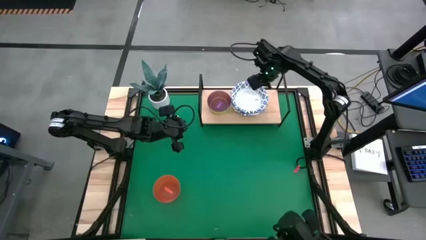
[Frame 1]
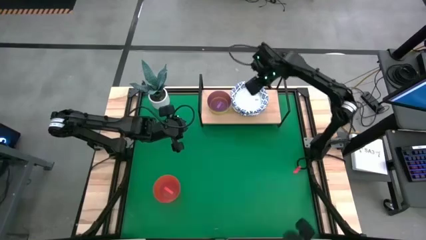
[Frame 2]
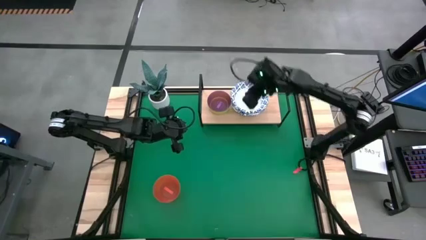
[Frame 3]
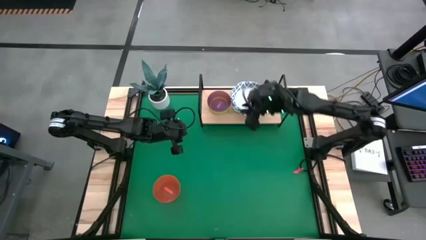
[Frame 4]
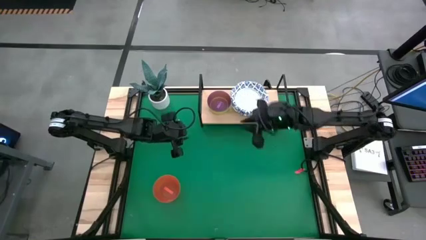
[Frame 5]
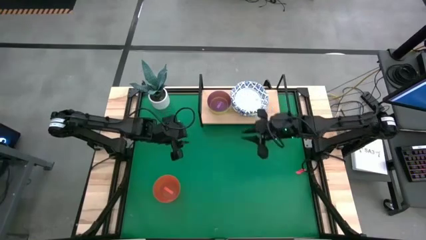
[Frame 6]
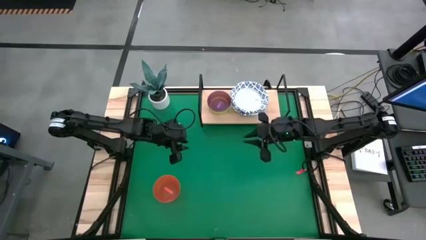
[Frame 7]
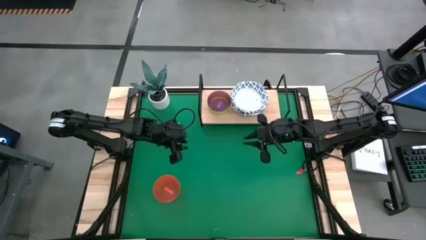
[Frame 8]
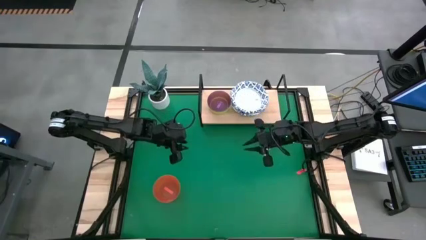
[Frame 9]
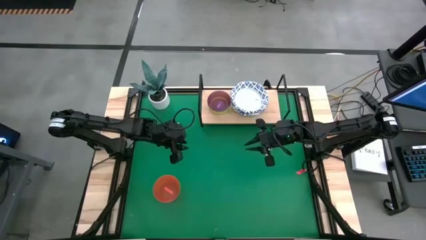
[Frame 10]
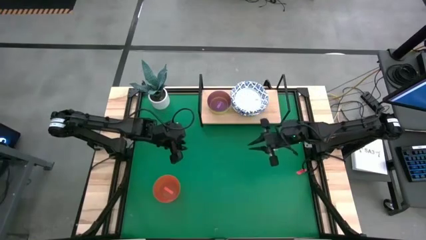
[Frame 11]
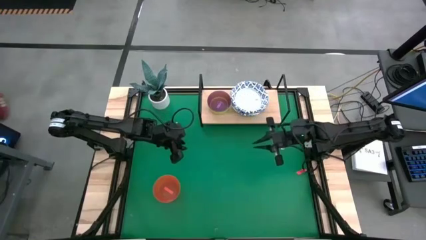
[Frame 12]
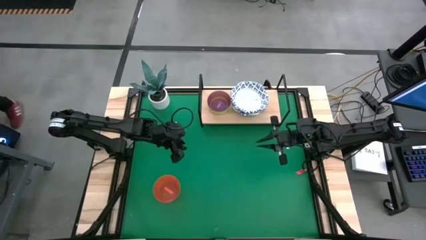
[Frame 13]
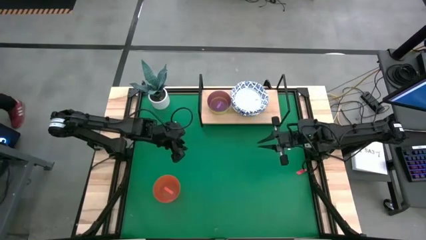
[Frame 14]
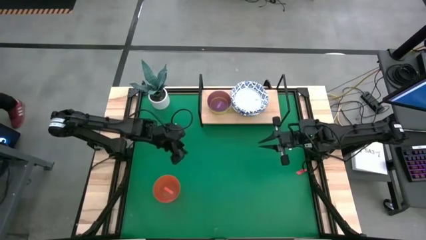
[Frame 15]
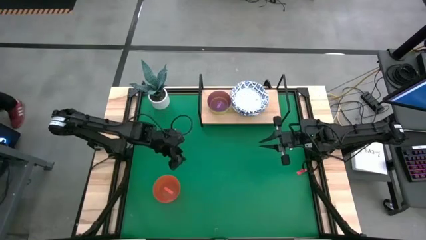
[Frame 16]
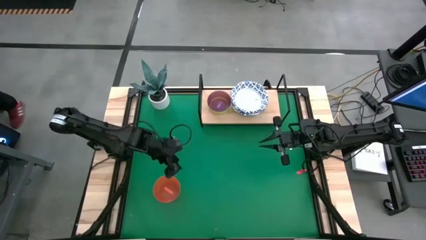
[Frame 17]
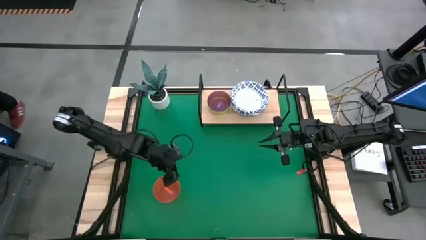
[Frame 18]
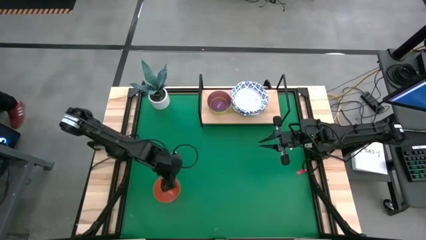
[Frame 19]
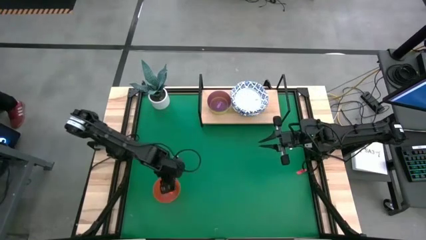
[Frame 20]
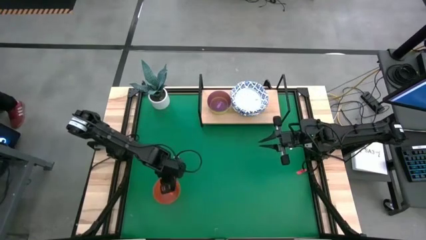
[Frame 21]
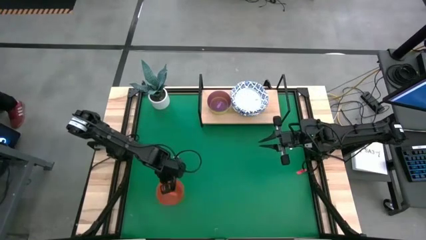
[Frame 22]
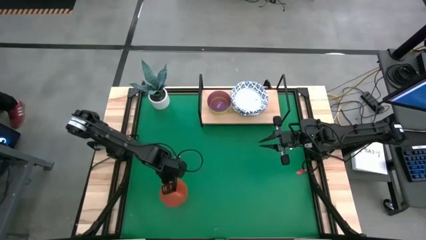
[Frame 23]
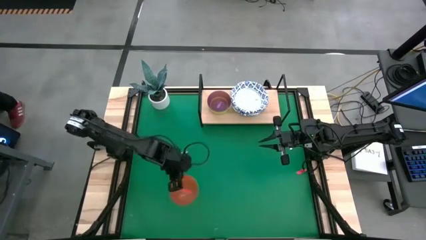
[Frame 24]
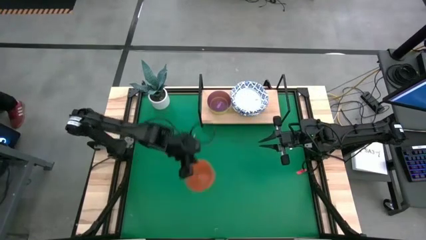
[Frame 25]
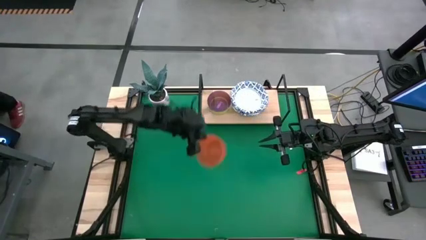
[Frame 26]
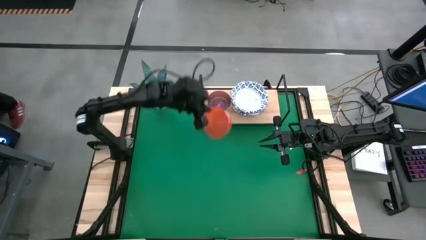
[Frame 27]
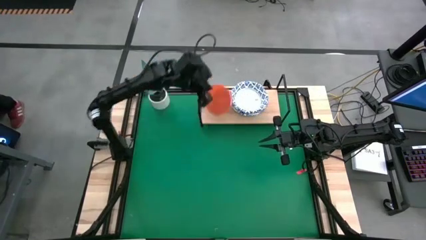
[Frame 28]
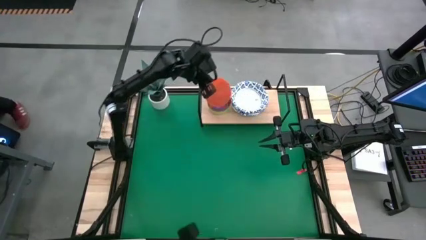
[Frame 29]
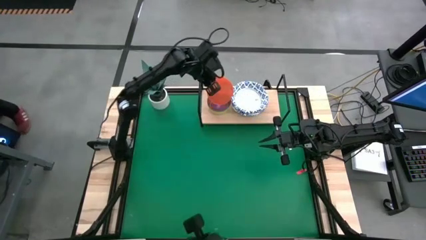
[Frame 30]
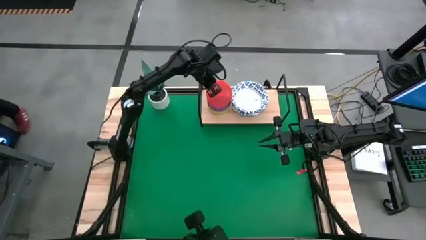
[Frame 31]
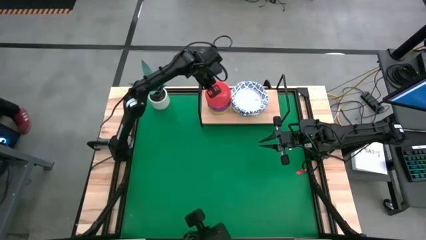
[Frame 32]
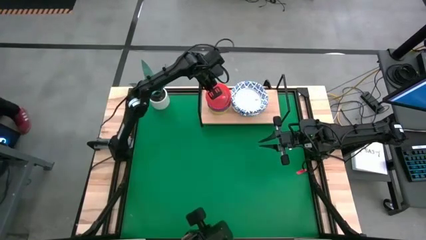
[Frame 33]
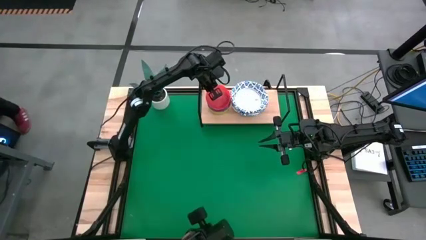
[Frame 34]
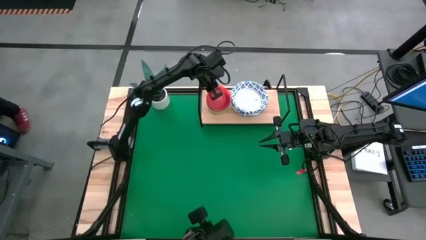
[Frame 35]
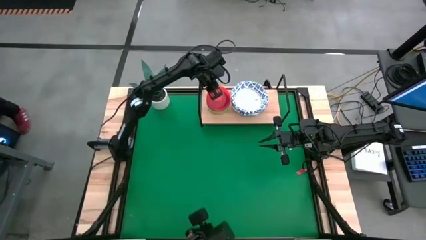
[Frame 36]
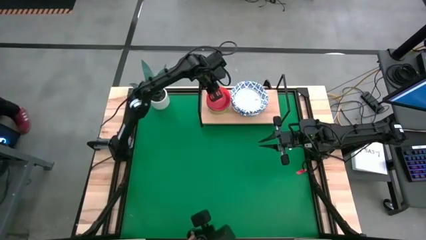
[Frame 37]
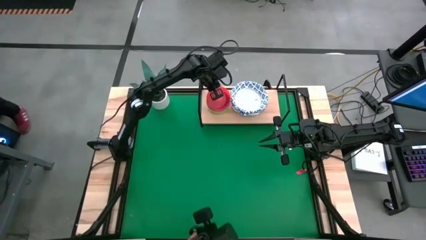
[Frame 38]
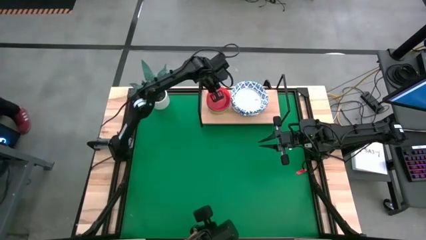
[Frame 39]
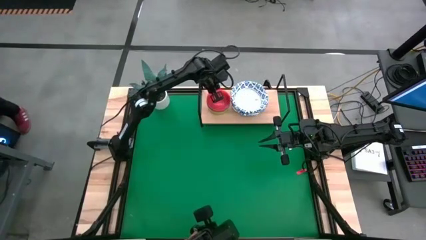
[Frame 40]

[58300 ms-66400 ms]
Task: Place and stack bowls onto a shelf
Stack the orange bowl into the purple bowl on the shelf

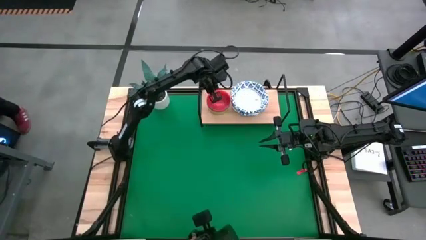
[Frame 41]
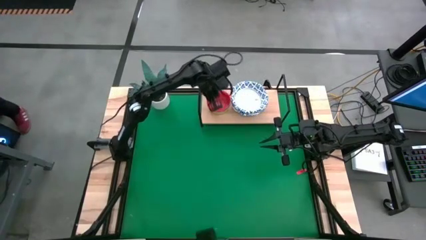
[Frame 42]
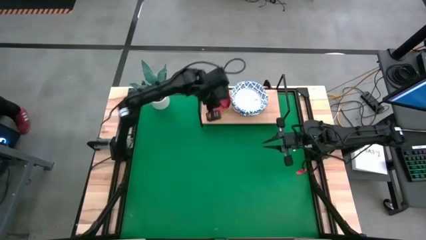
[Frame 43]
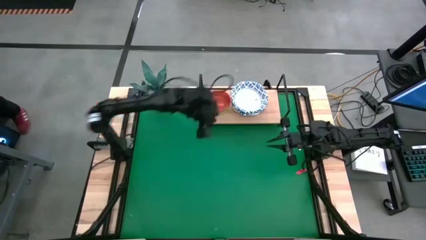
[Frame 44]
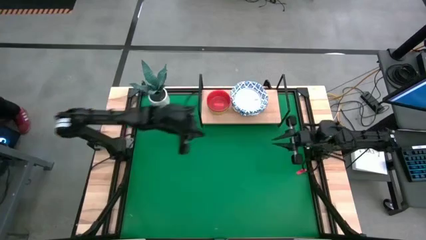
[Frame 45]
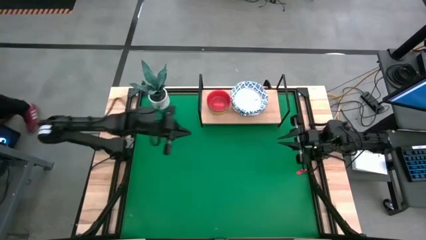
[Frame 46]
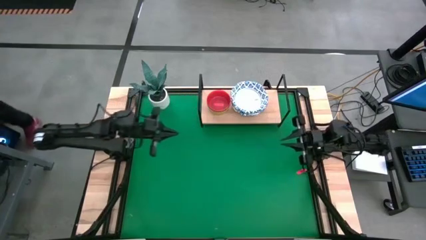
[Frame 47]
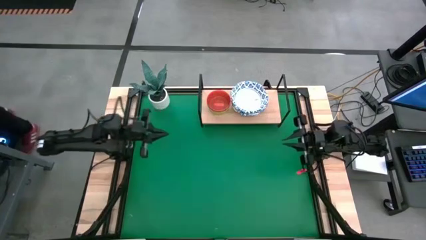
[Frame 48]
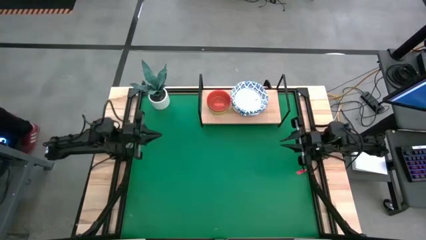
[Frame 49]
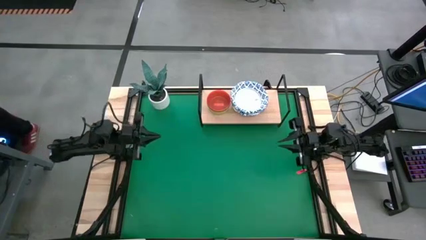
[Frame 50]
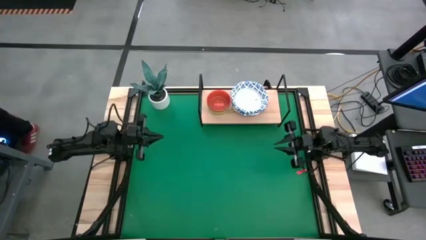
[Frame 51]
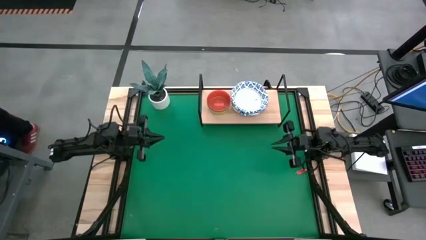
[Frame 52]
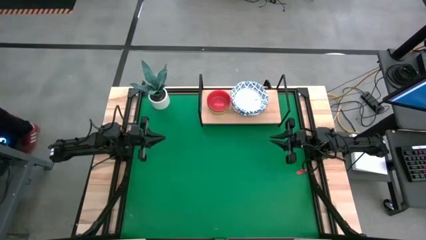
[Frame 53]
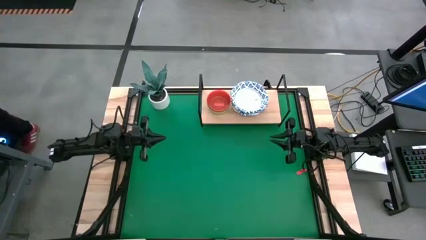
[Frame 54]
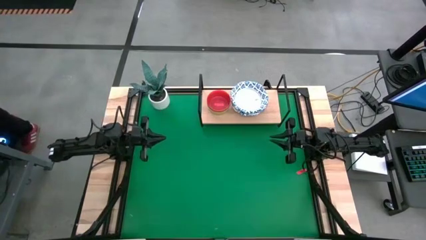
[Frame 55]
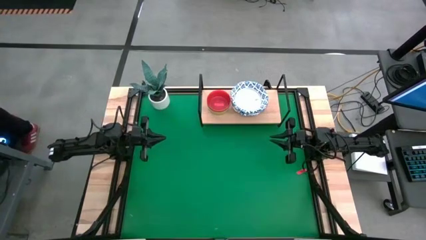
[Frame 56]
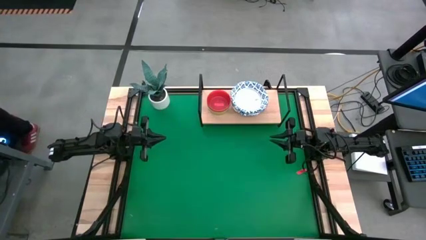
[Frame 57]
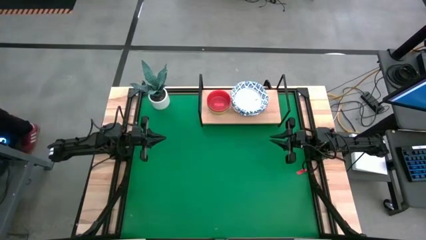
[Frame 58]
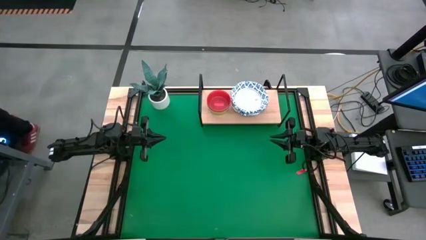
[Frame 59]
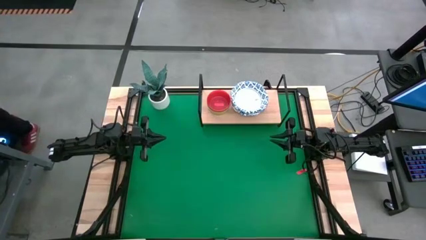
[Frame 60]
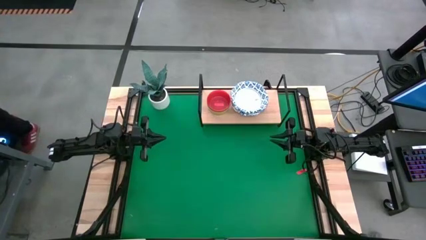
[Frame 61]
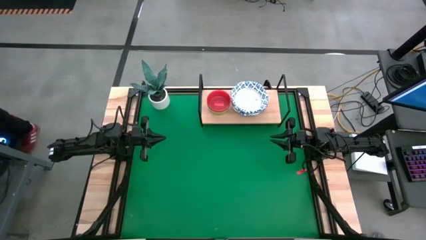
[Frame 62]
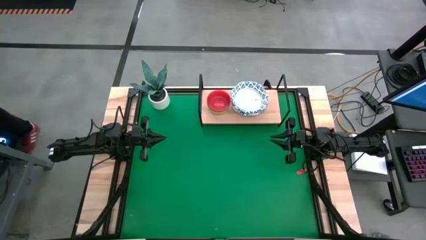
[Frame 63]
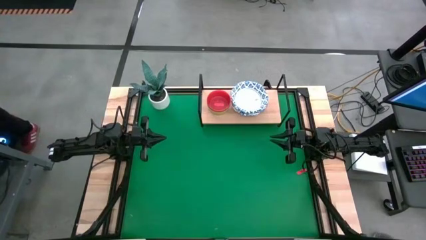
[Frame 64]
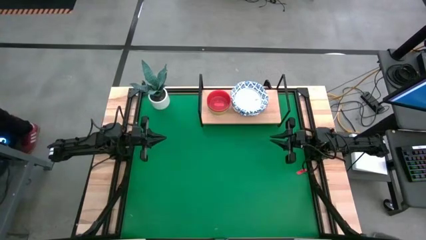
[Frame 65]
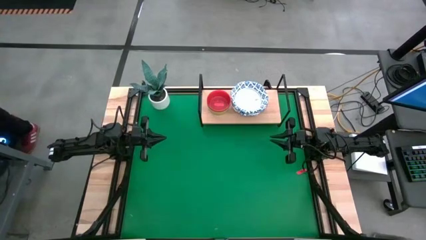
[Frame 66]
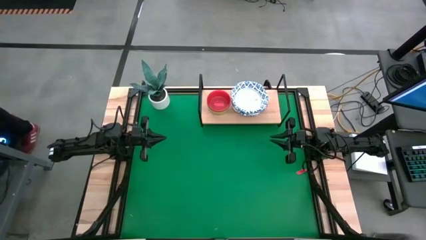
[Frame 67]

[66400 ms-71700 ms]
Return to Home Position

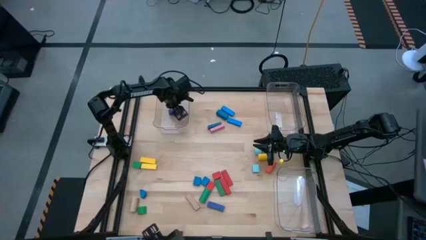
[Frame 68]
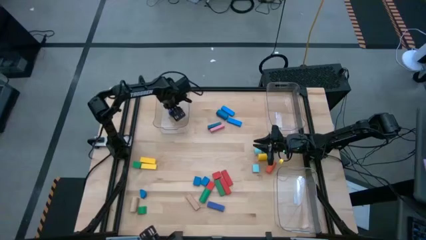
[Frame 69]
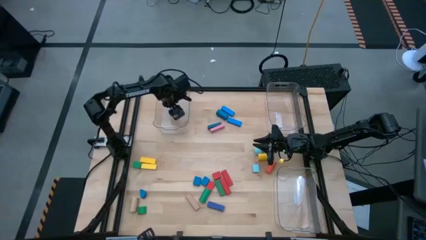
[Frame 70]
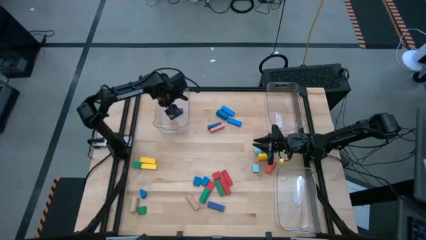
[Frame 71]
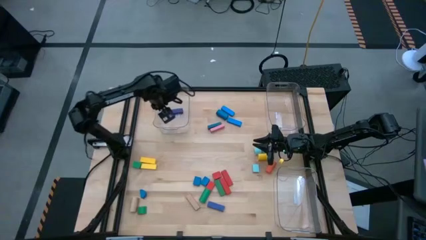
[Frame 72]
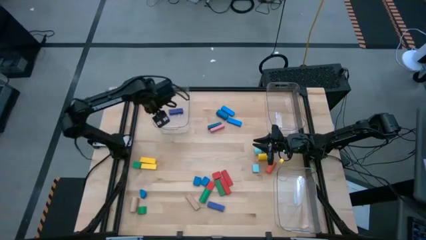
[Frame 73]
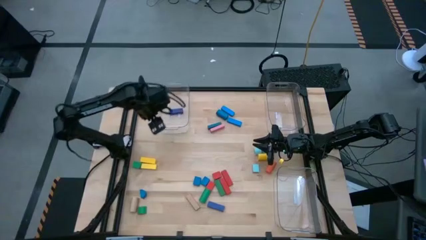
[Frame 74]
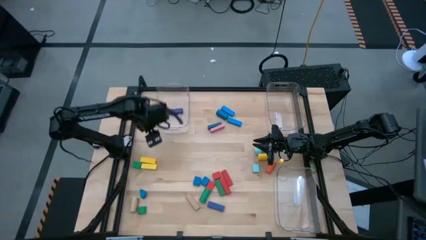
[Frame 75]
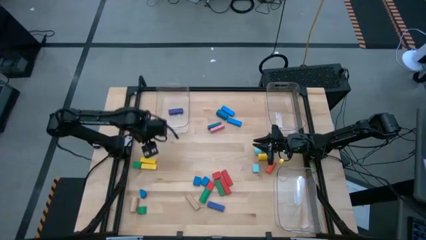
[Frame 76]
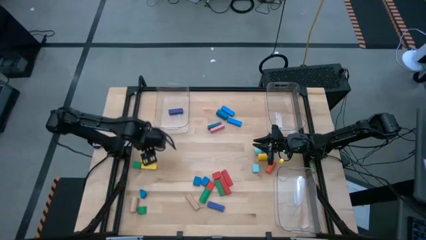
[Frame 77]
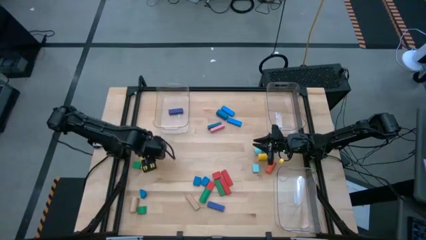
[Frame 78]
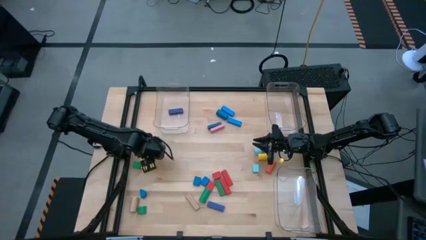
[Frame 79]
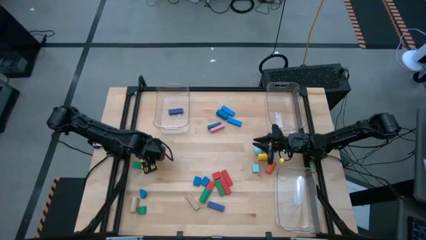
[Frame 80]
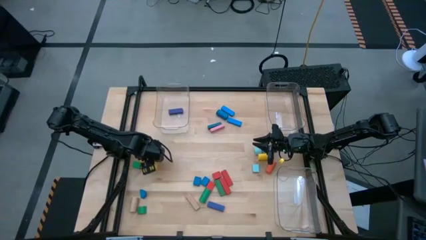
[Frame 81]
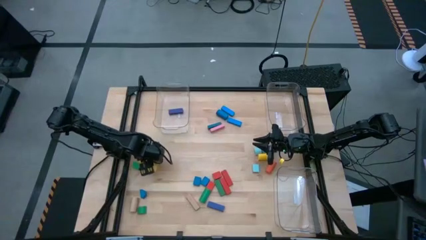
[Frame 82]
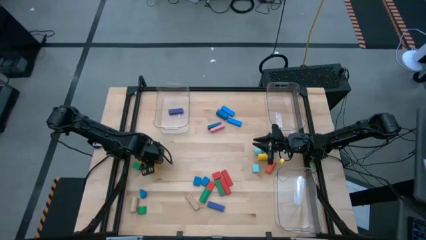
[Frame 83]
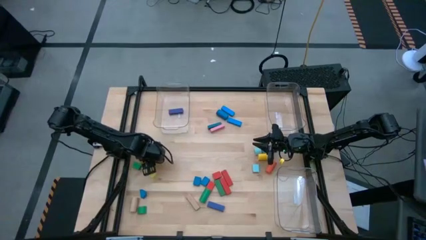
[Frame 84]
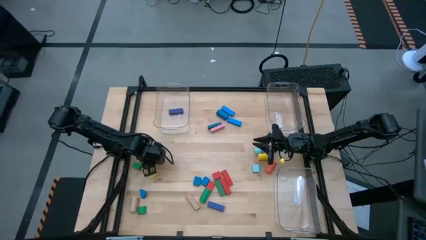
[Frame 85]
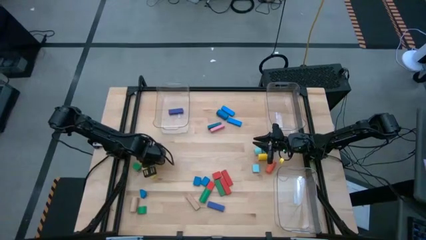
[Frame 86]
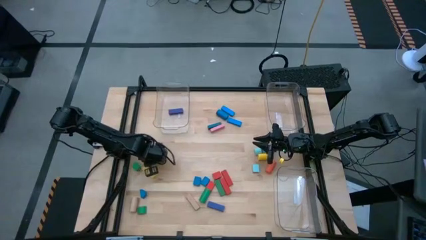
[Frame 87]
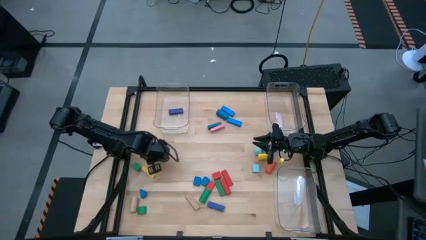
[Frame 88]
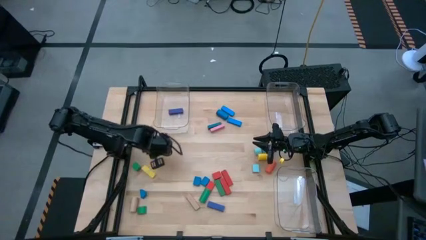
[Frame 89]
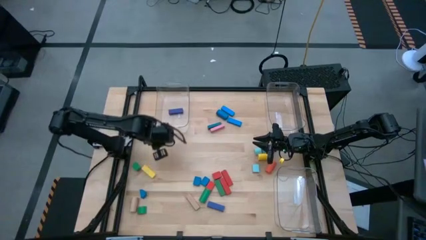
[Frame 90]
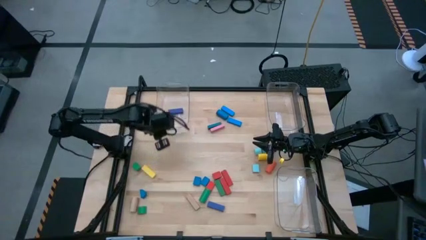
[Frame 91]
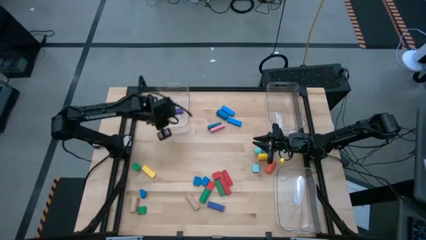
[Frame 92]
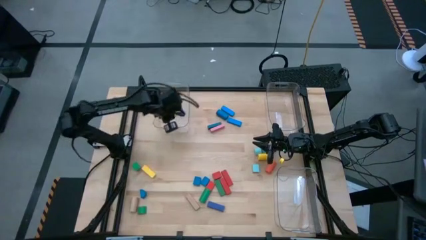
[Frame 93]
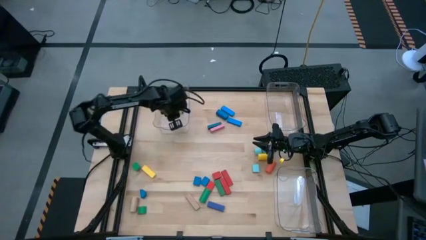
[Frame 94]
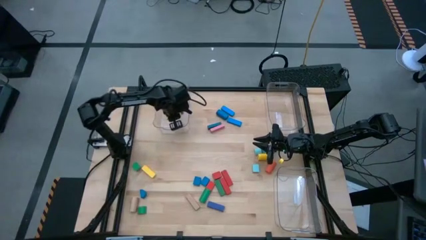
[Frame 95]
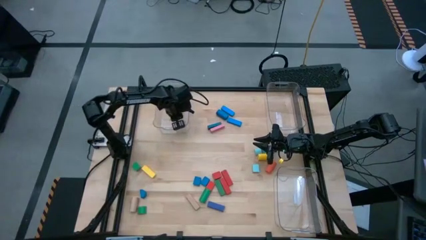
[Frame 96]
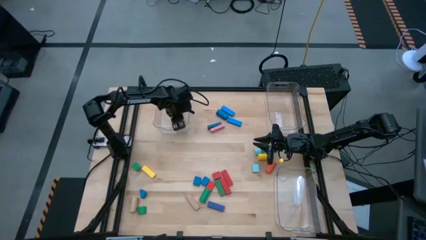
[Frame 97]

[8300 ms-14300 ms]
Task: Sort blocks by size
Put the yellow rectangle block into the top left transparent bin
